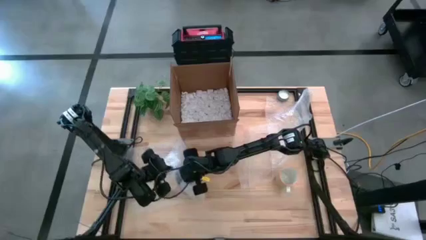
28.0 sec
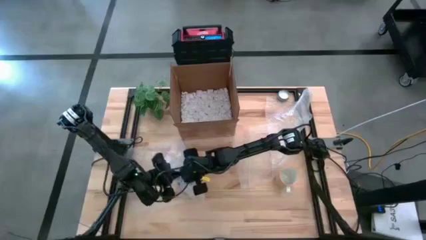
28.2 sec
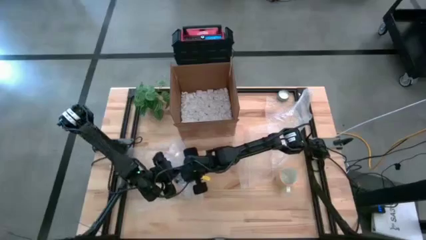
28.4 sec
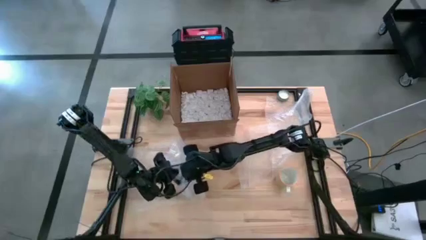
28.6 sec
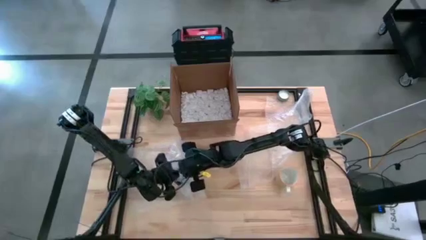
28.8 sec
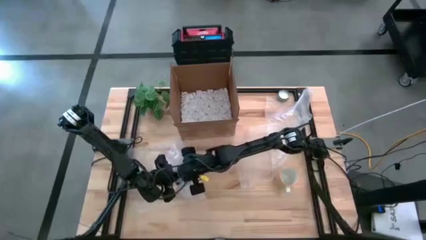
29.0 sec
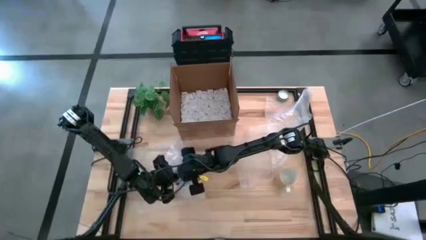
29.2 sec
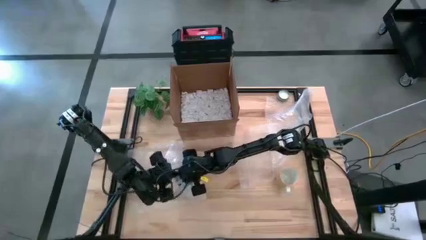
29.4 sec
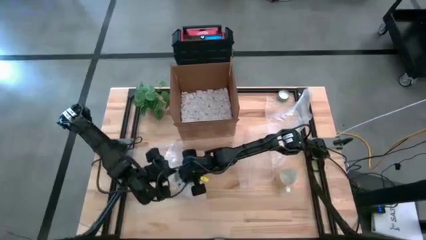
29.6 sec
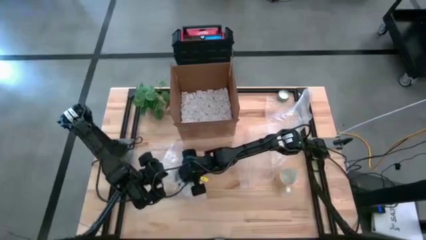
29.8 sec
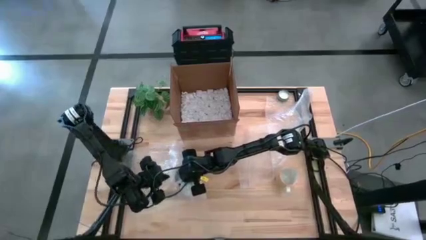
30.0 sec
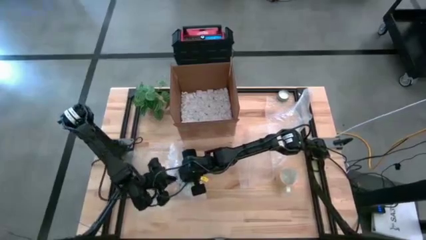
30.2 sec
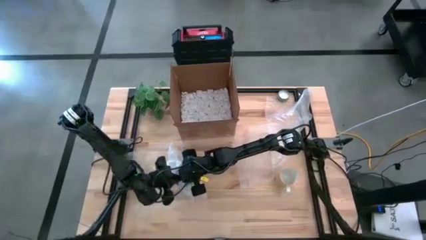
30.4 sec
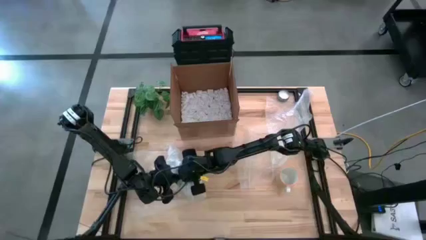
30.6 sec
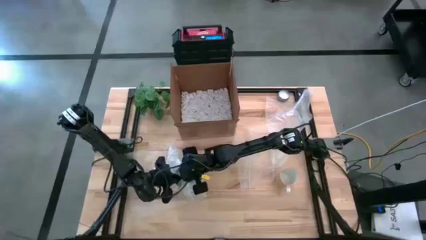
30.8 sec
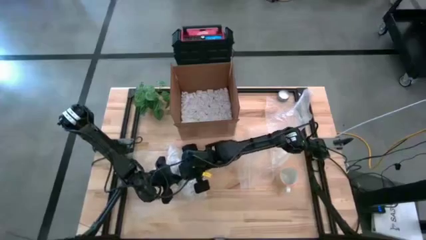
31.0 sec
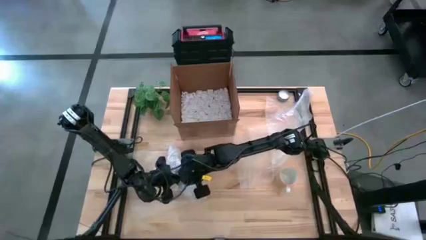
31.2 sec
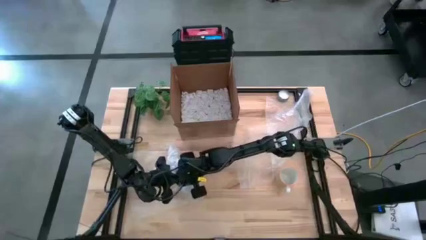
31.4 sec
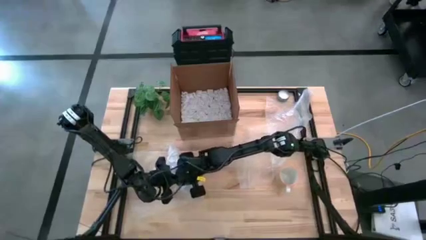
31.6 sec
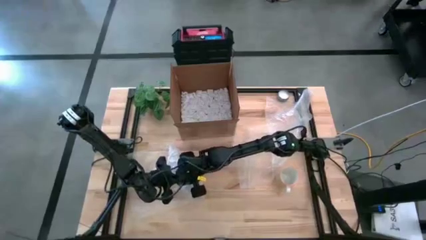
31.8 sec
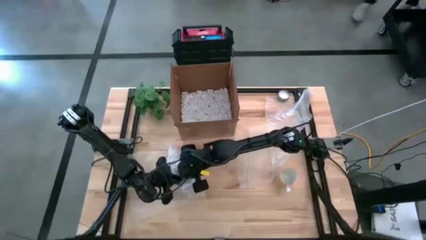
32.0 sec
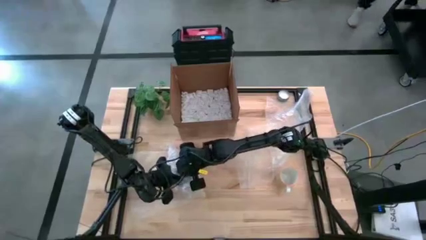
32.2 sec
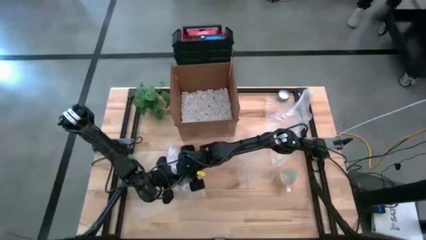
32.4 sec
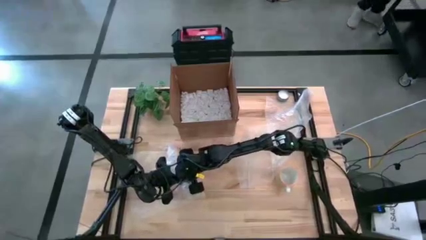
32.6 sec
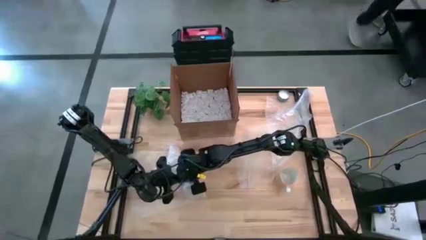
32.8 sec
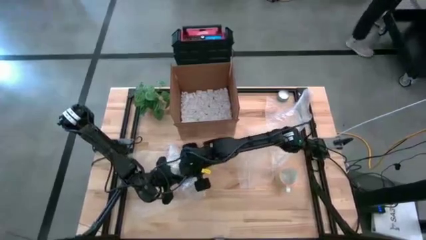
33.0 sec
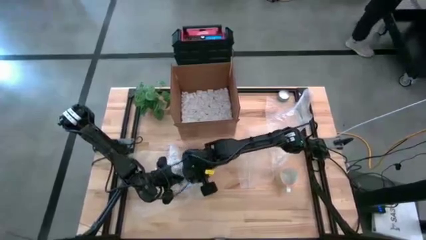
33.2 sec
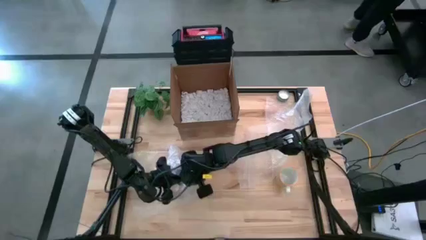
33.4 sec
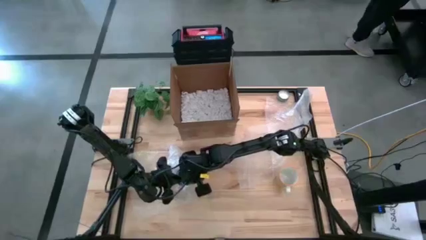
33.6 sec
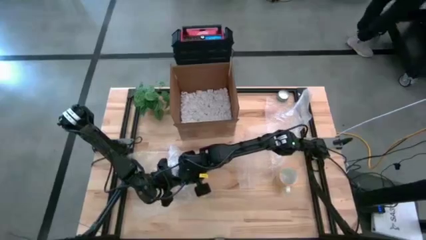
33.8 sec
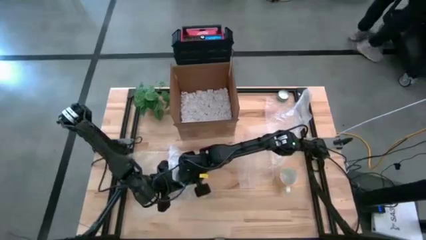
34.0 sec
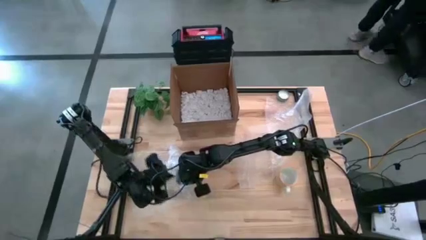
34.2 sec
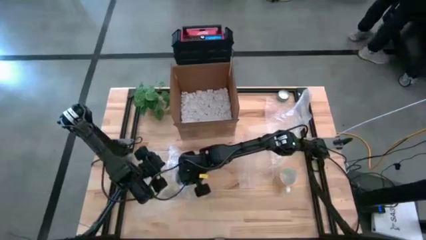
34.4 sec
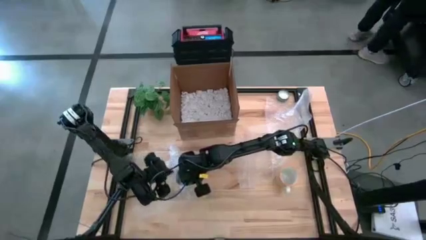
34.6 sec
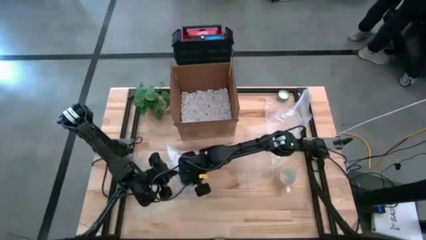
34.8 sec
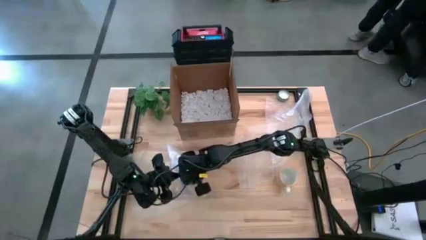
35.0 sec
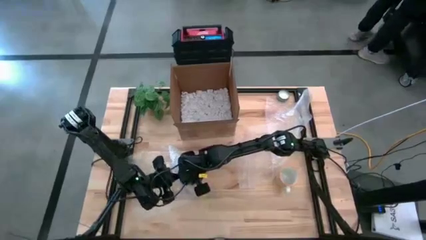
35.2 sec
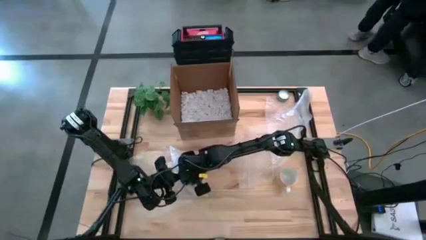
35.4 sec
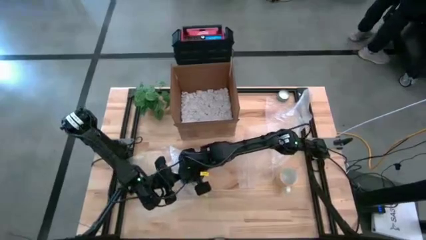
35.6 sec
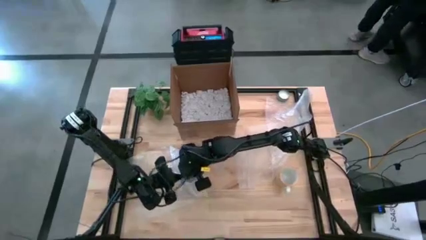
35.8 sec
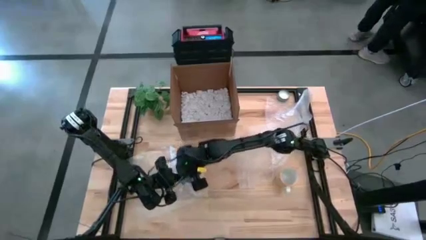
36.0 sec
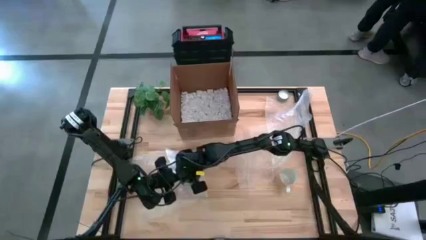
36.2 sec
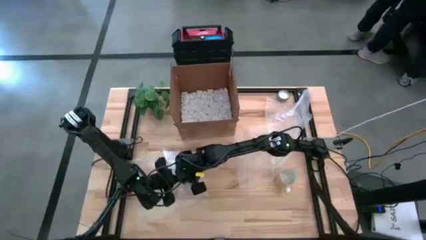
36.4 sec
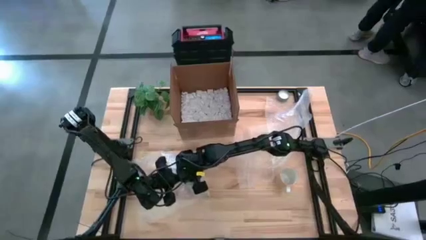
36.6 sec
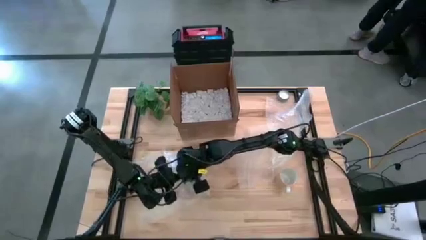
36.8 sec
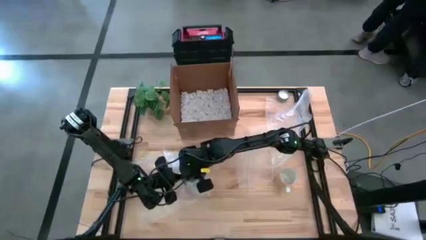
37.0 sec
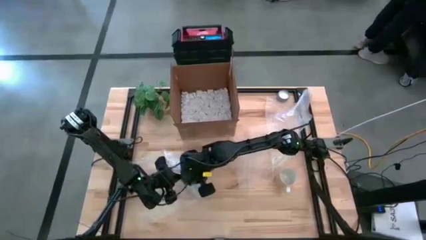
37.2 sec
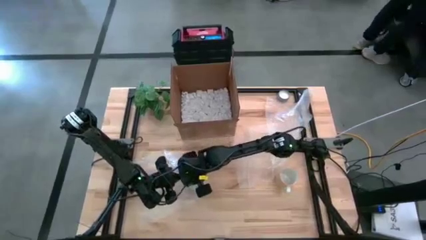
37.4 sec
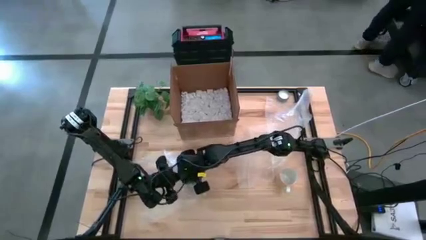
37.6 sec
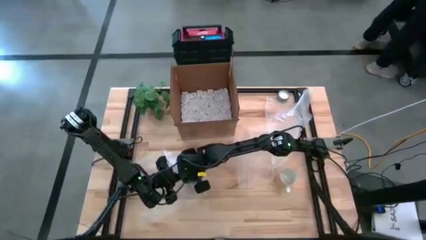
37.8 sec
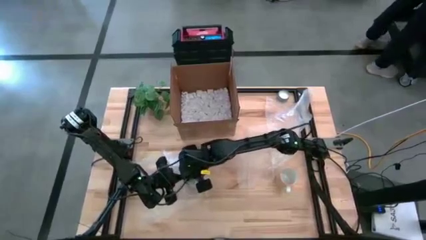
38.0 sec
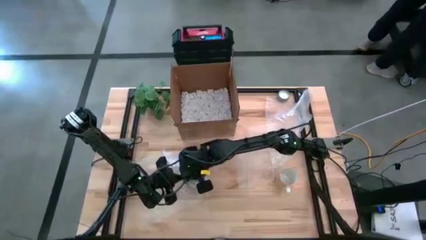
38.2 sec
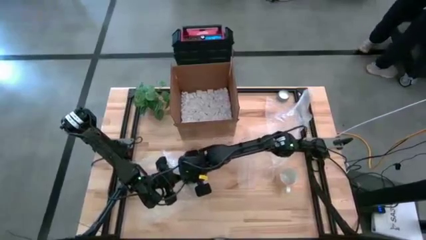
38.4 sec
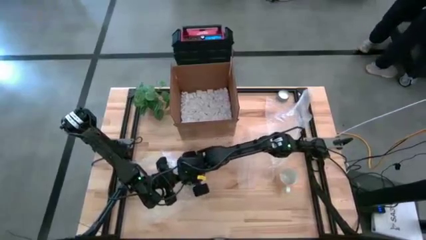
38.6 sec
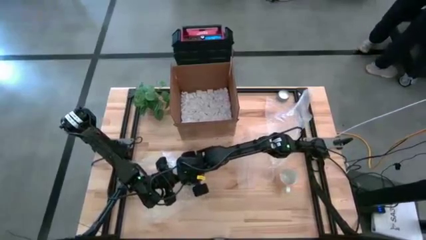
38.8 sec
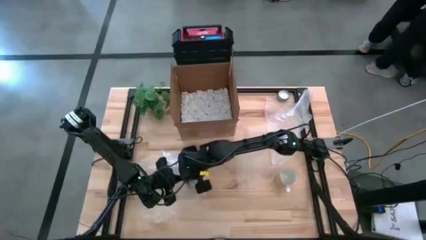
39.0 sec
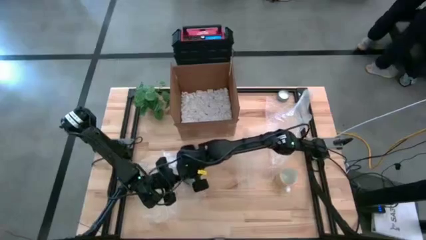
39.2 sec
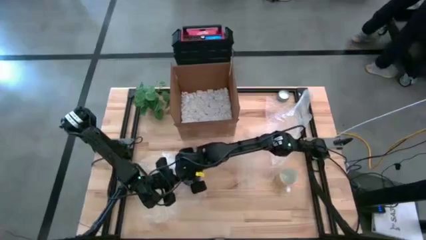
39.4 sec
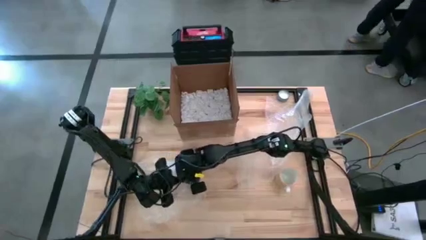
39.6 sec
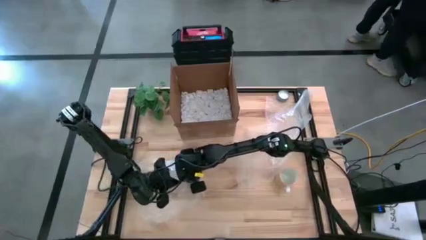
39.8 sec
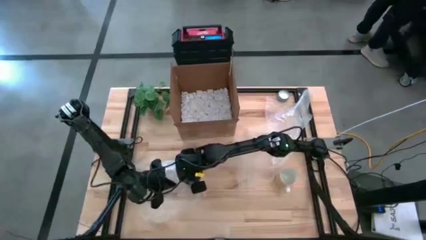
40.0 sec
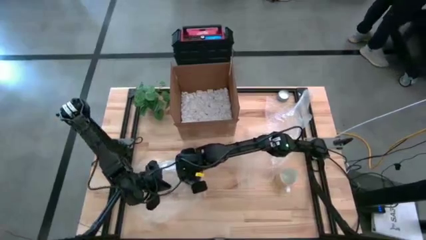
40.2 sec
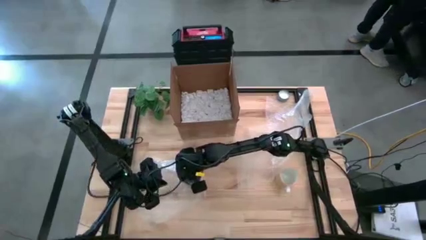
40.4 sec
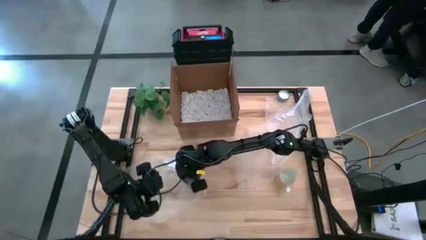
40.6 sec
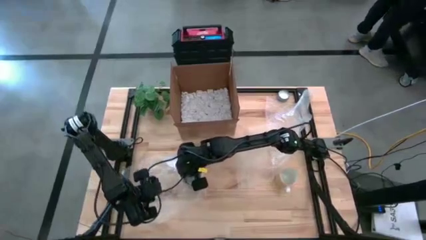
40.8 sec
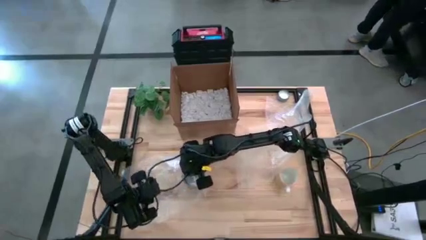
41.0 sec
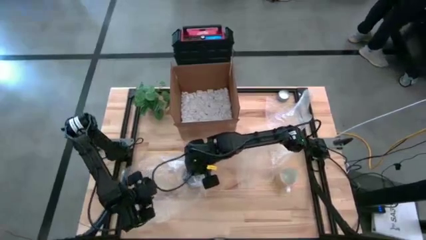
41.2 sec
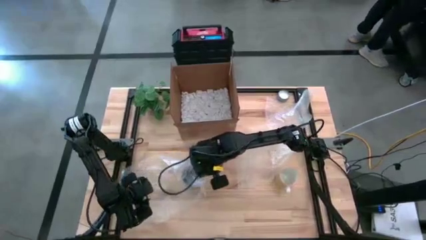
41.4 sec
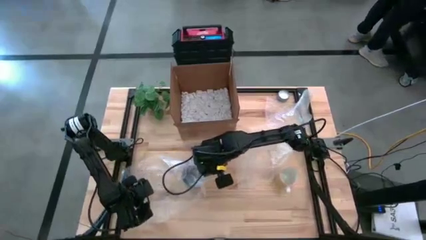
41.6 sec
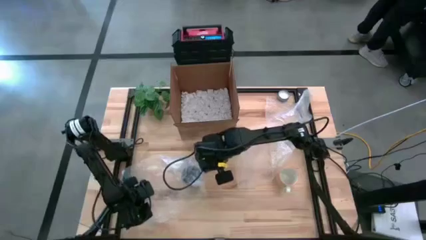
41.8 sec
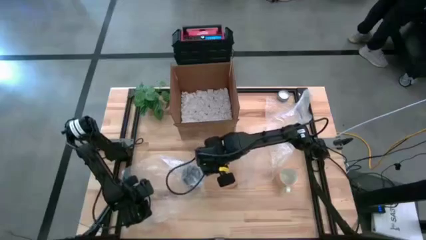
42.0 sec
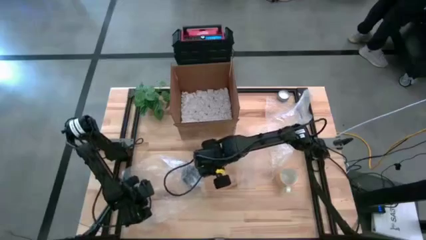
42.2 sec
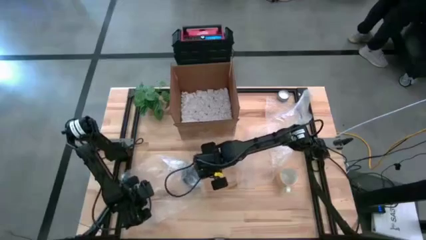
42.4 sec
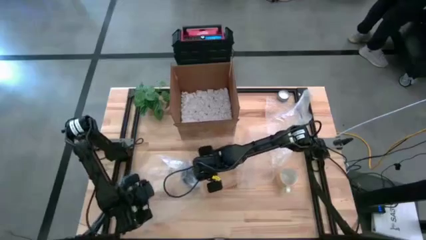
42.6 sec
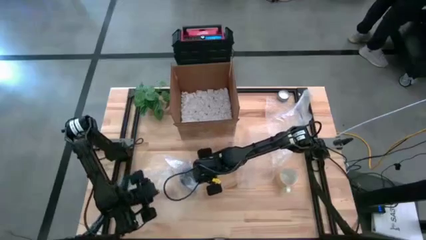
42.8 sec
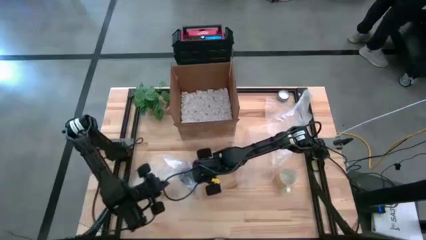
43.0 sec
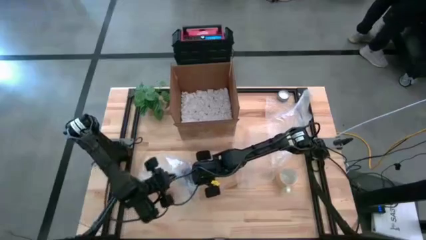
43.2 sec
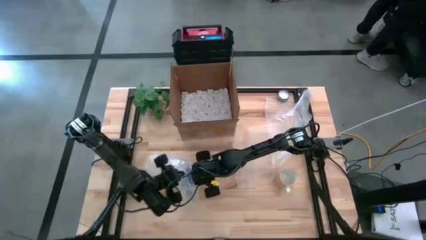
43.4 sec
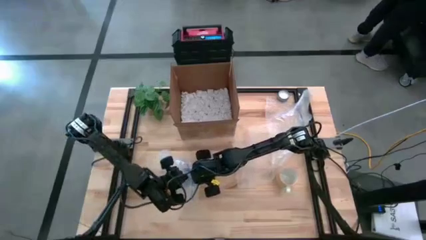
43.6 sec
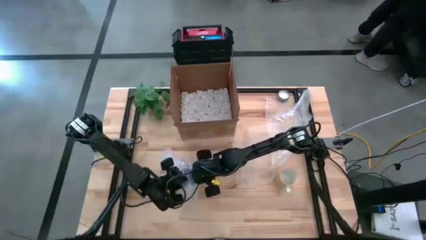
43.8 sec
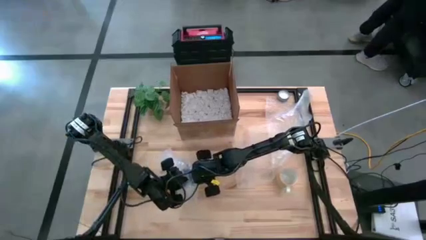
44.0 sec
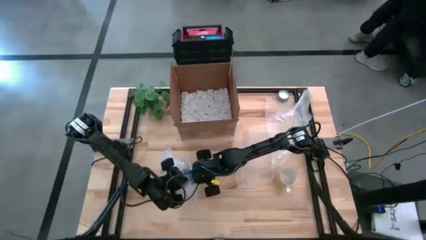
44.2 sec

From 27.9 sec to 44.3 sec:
Task: wrap mug
Wrap the blue mug using the left bubble wrap
